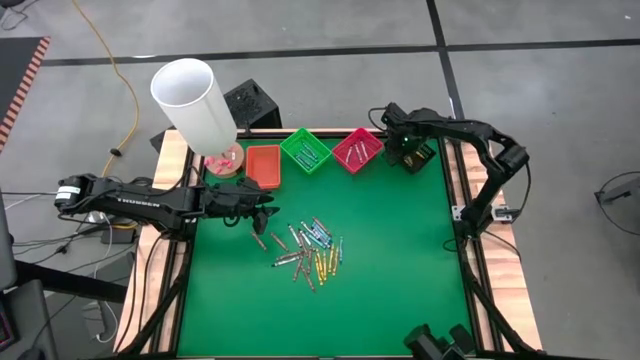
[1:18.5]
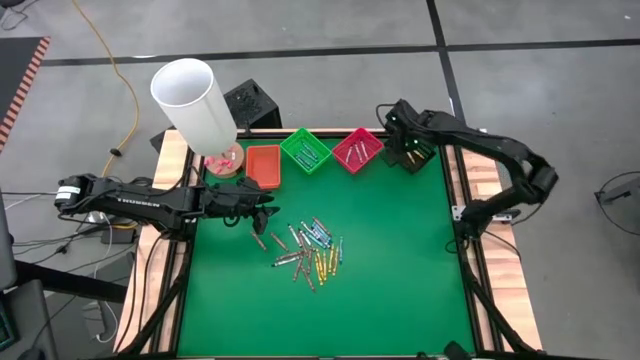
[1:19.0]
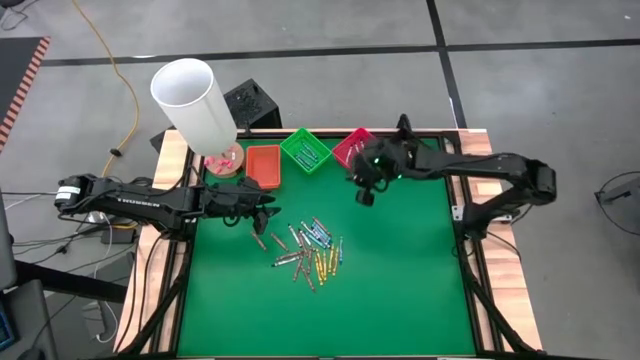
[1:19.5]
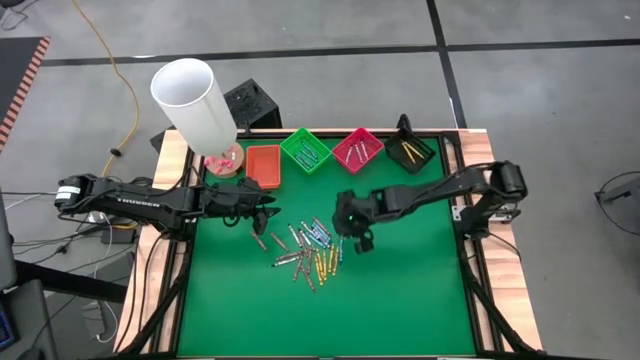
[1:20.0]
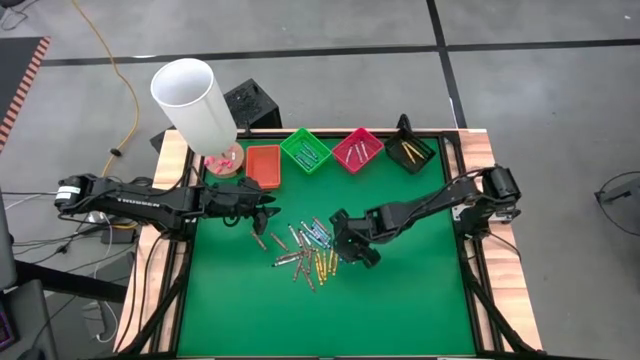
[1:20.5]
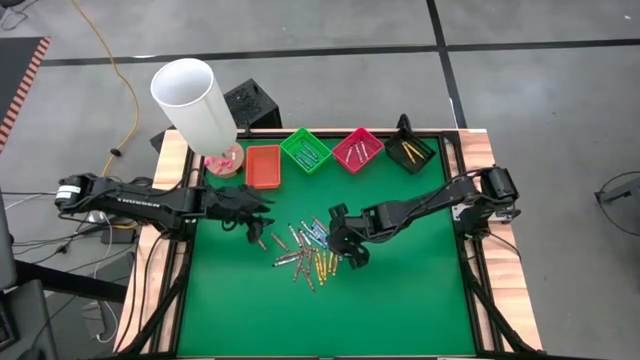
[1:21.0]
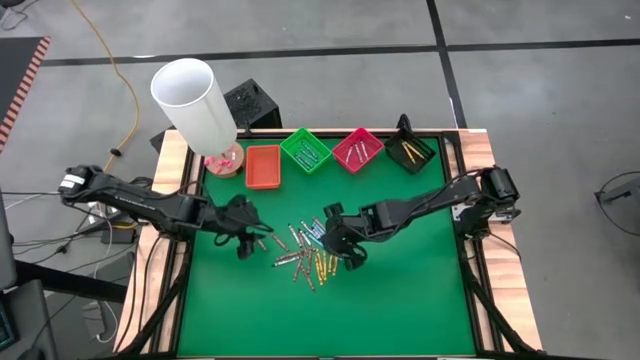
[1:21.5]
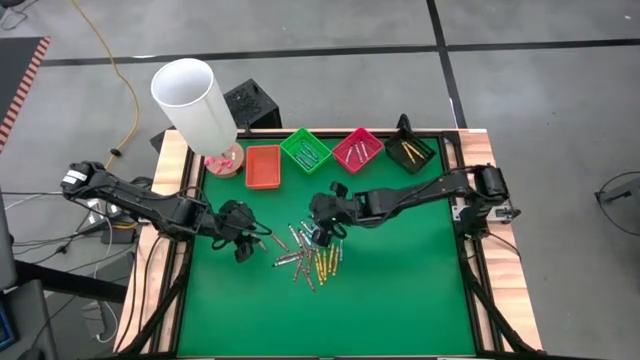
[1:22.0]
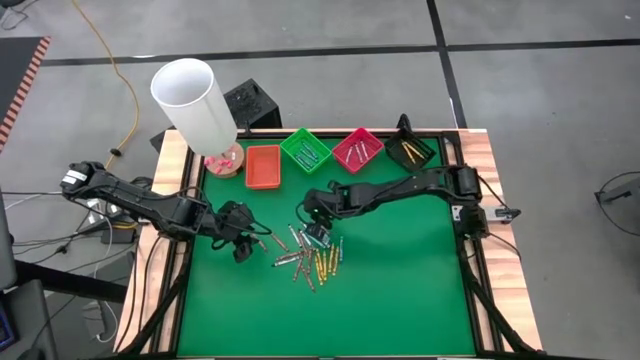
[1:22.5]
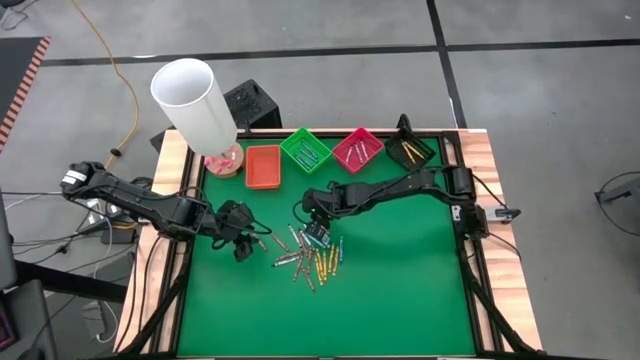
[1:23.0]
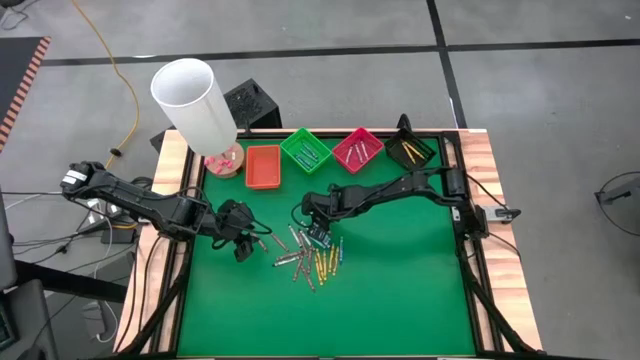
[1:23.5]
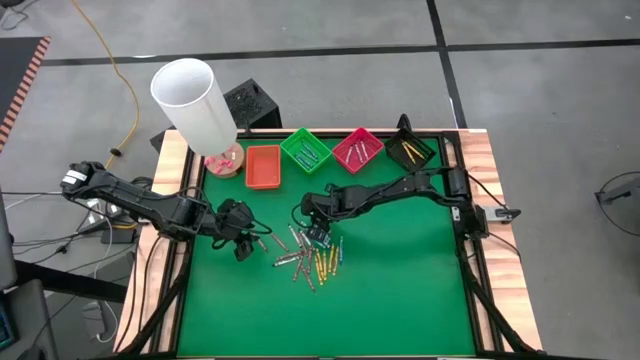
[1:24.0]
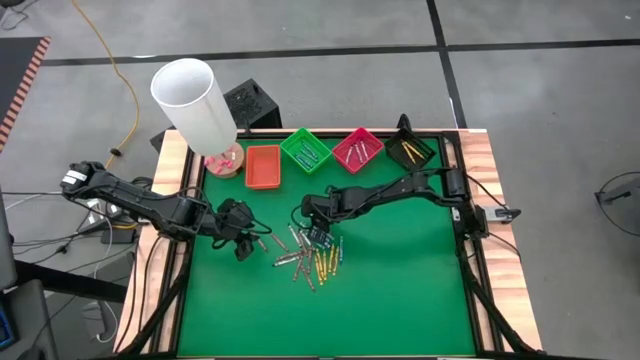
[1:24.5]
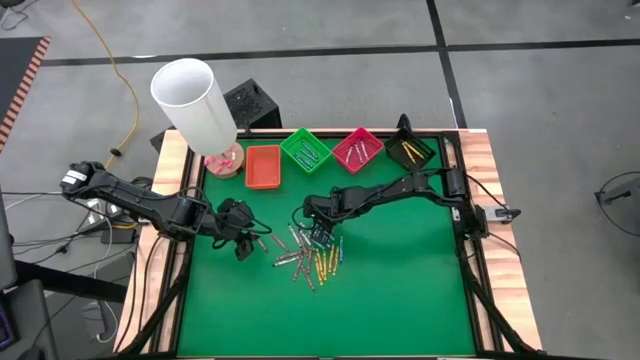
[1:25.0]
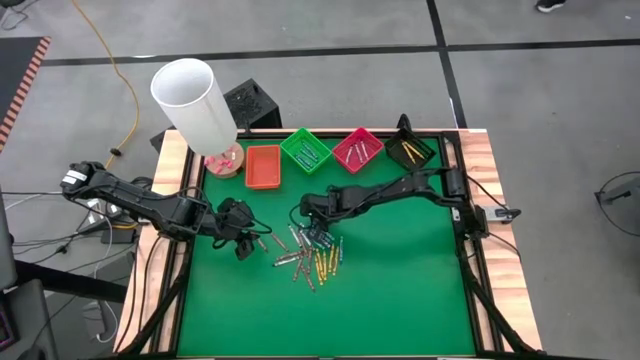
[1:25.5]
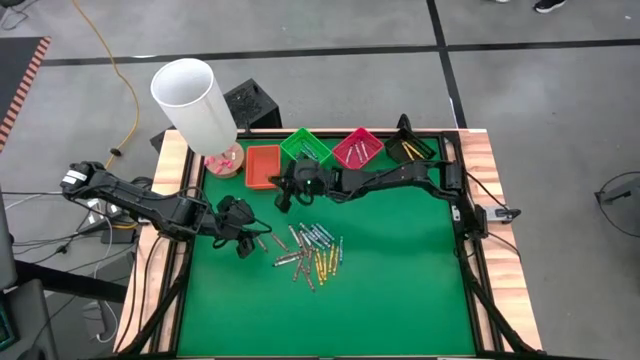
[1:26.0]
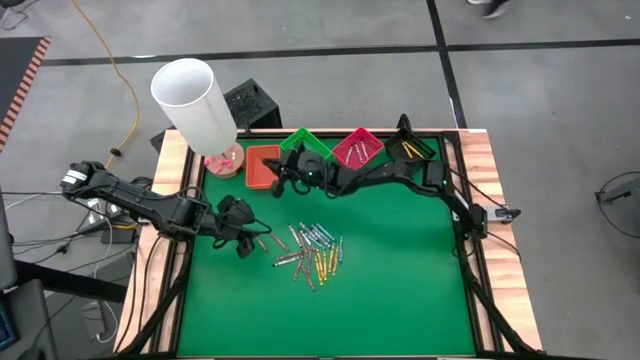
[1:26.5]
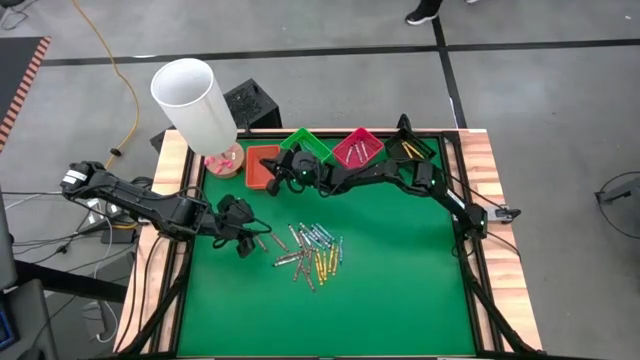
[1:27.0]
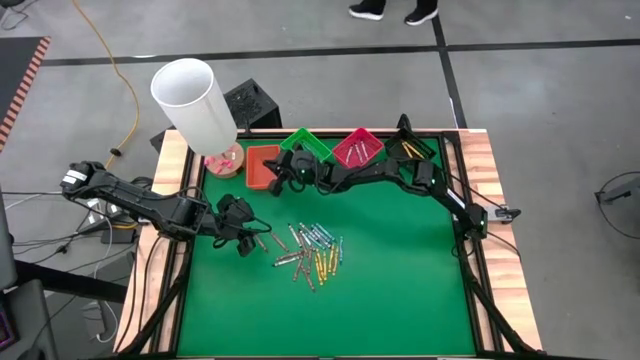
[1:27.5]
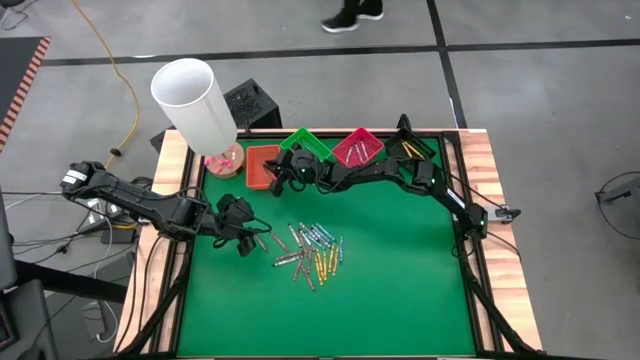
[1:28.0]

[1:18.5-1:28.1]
Task: Sort crayons
Put the brown crayon into the orange bin

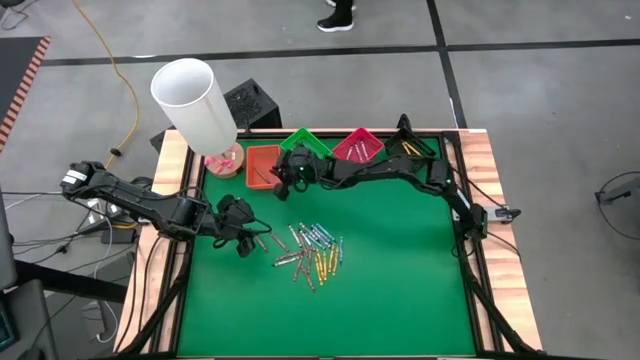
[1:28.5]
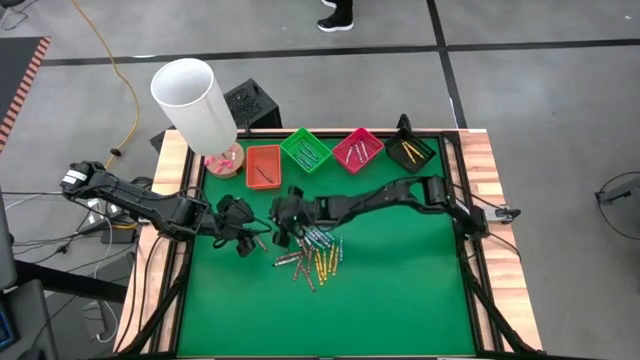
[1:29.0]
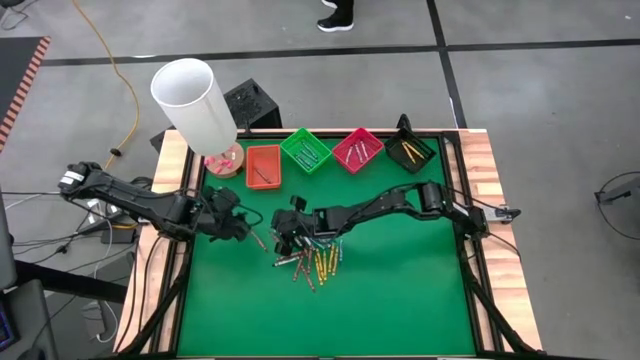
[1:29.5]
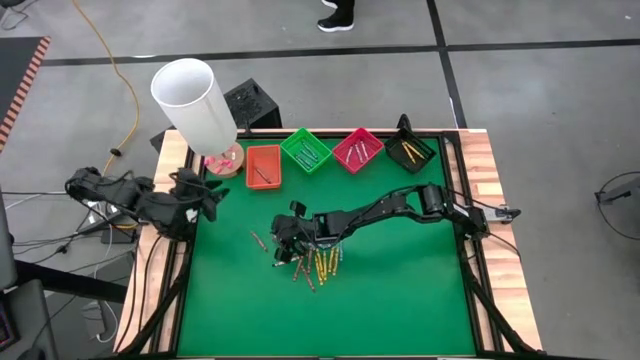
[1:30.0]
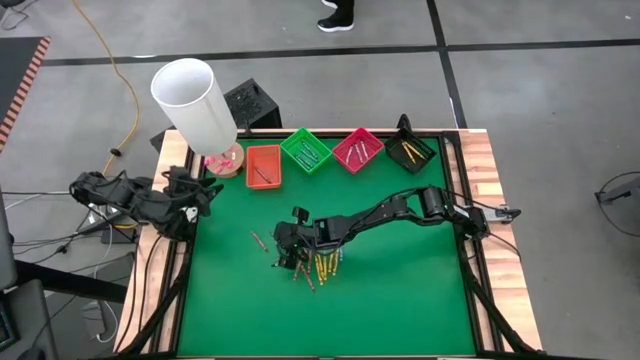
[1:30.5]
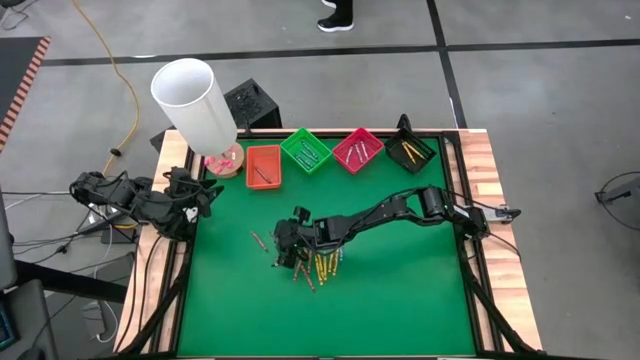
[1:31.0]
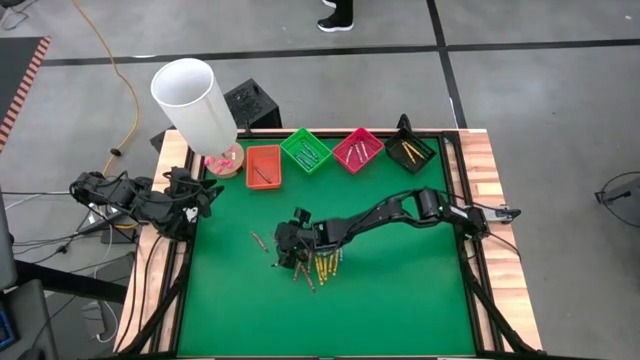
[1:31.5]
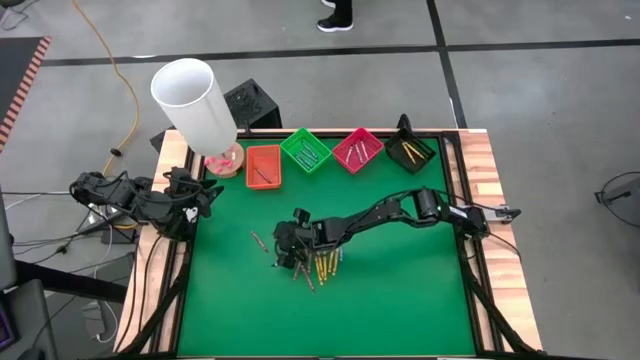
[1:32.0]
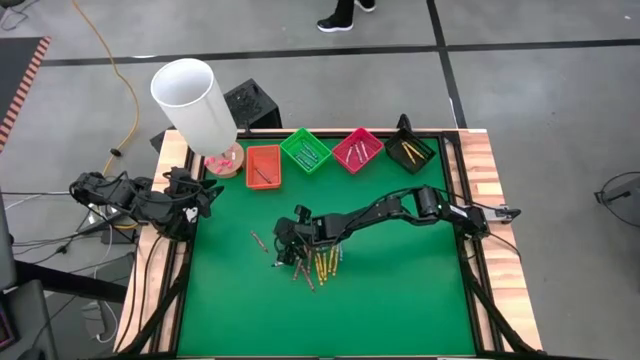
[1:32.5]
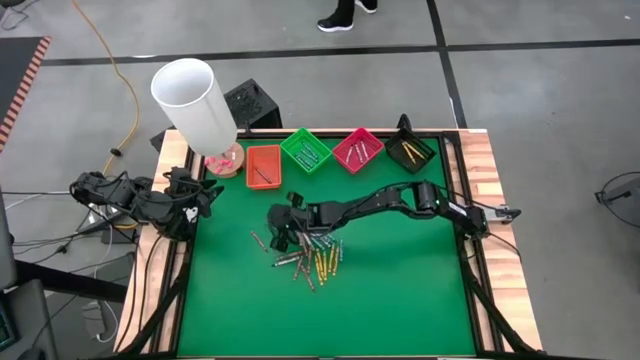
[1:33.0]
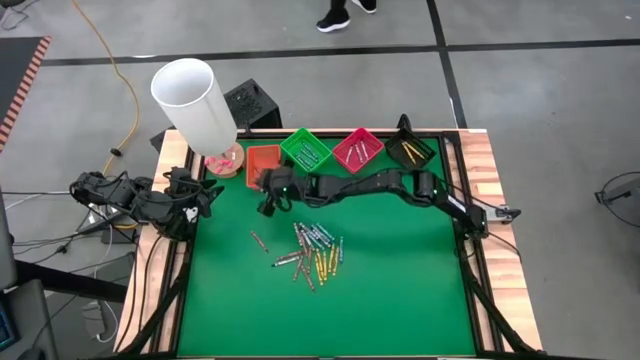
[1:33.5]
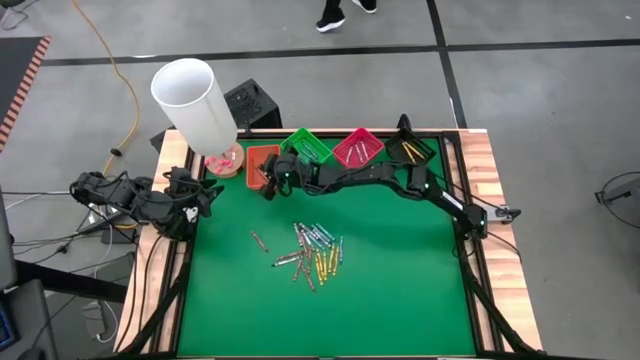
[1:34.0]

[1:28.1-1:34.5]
Put the brown crayon into the orange bin

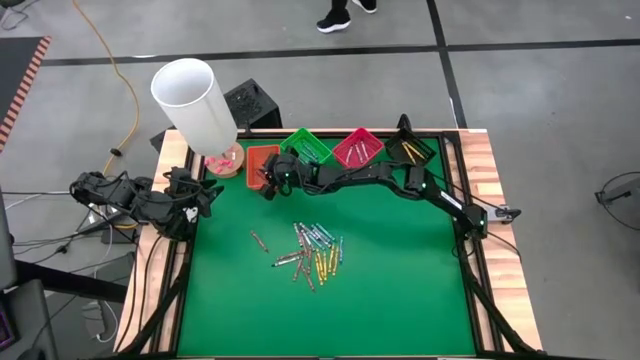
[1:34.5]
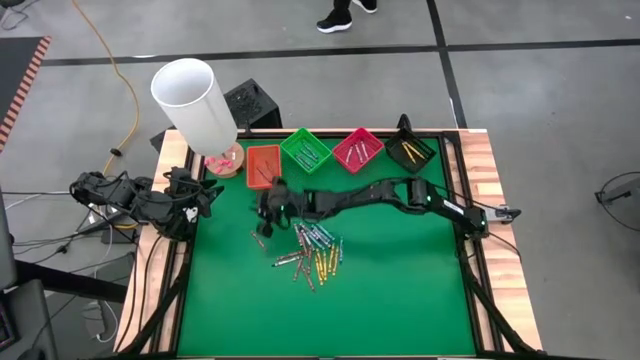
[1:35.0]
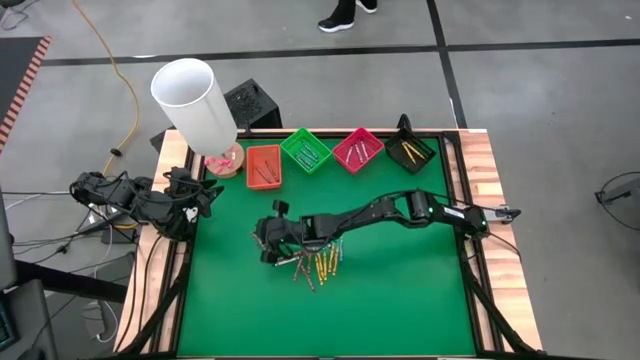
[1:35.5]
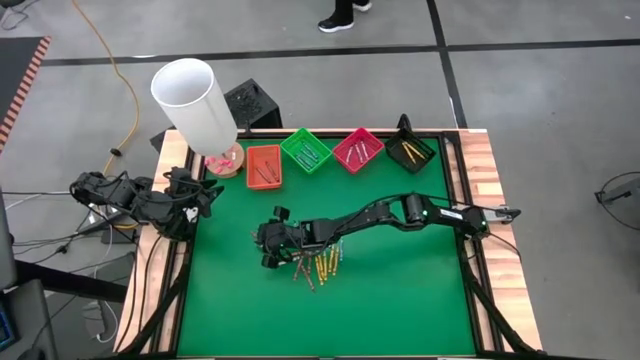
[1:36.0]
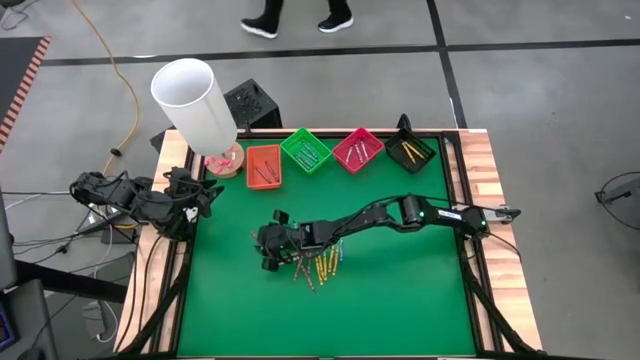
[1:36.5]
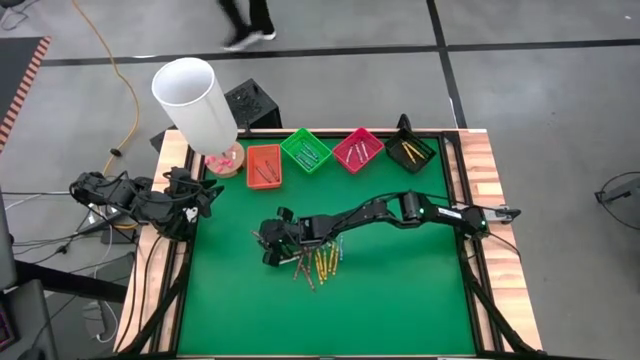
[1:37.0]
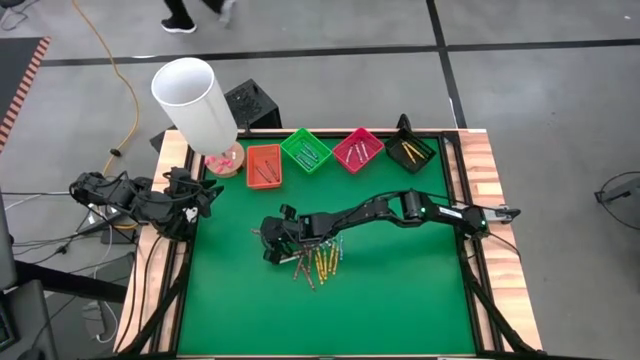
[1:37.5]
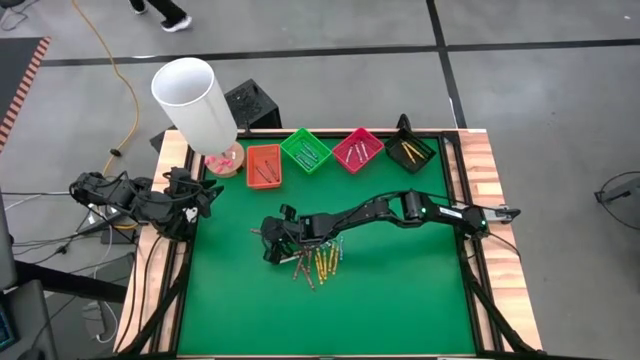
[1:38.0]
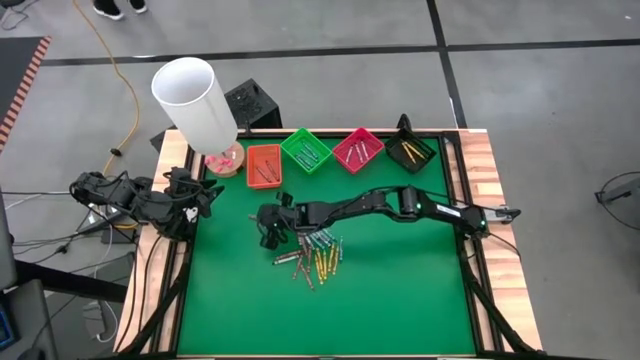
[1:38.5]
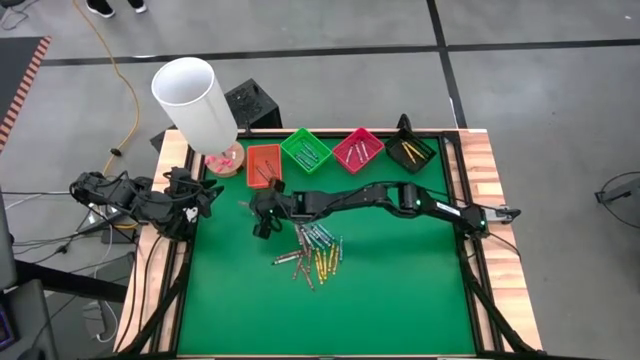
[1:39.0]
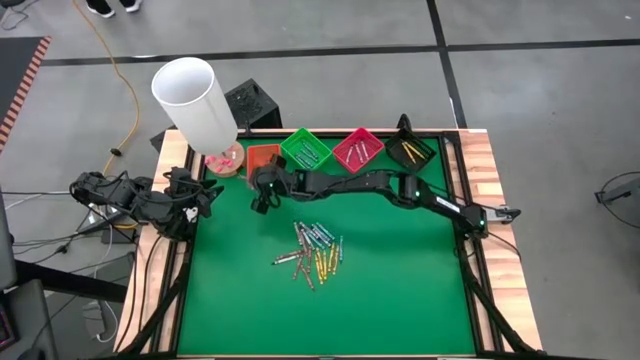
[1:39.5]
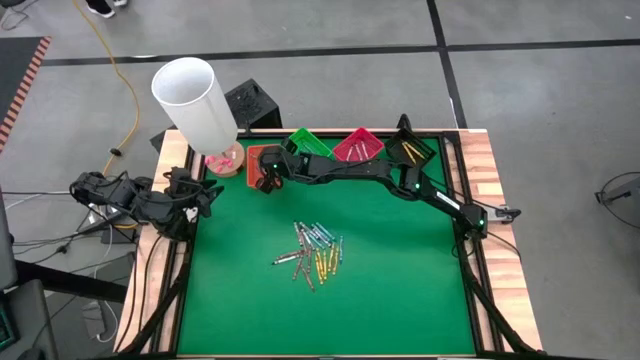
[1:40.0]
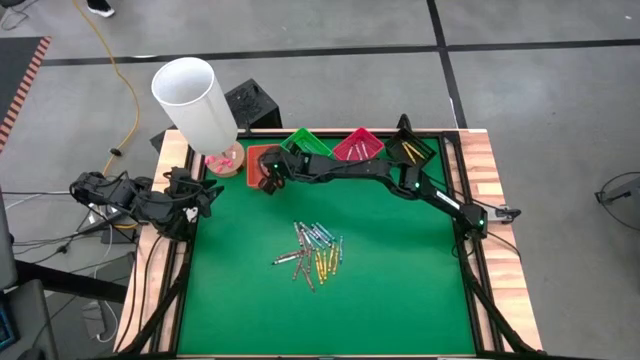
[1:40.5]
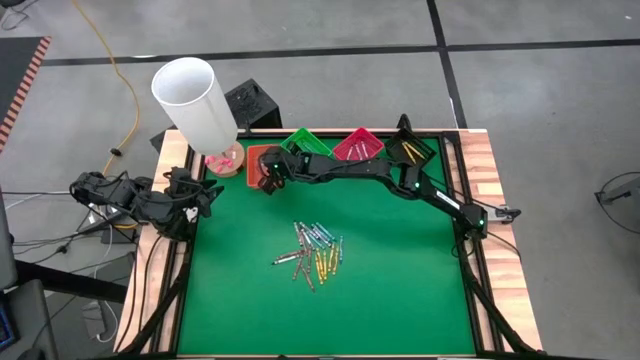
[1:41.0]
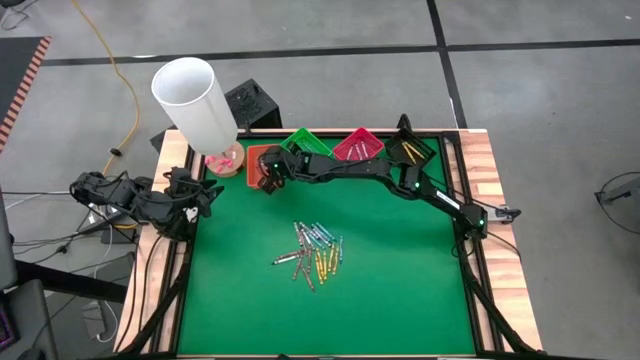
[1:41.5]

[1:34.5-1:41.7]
Put the brown crayon into the orange bin
